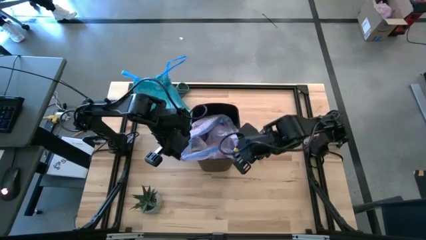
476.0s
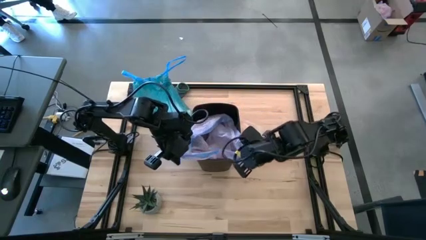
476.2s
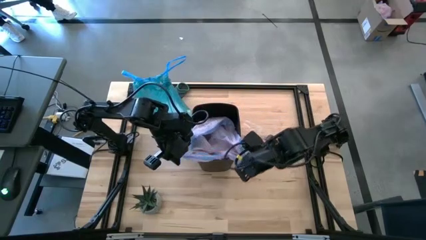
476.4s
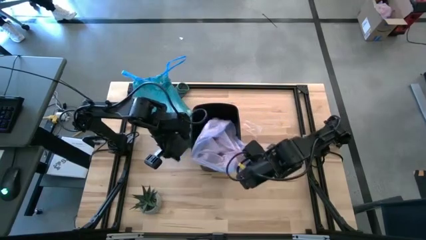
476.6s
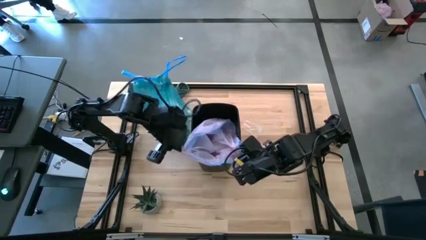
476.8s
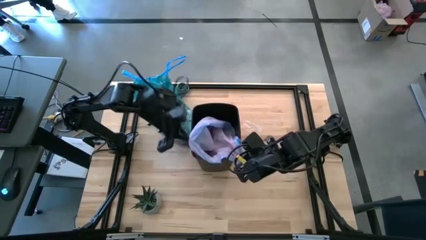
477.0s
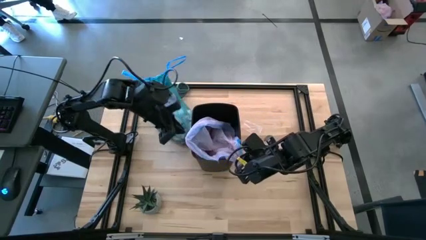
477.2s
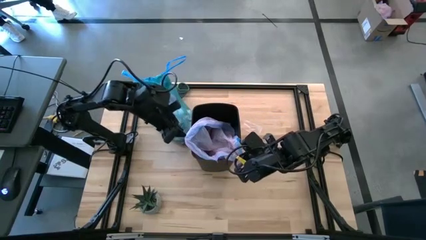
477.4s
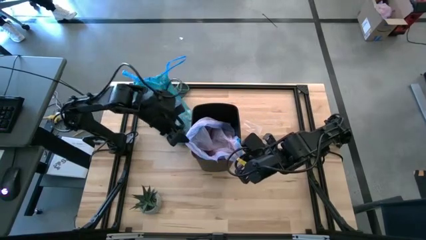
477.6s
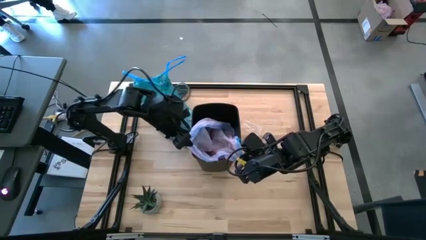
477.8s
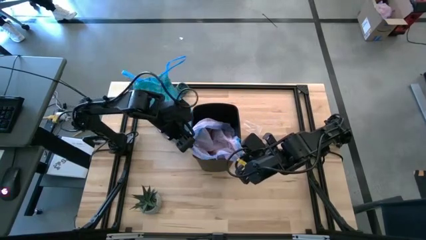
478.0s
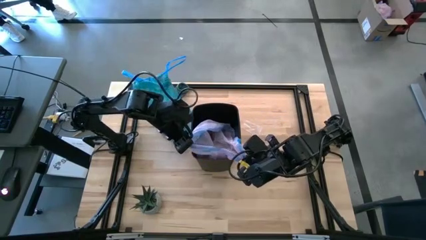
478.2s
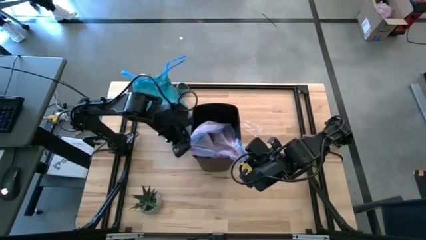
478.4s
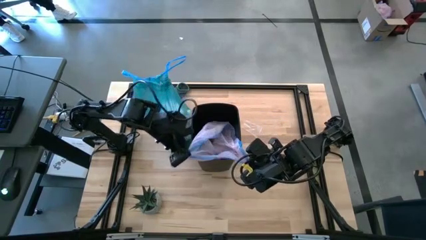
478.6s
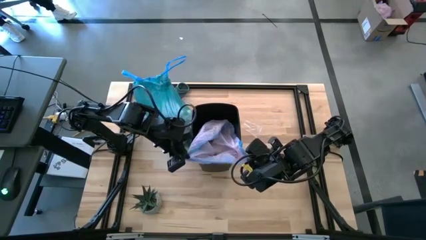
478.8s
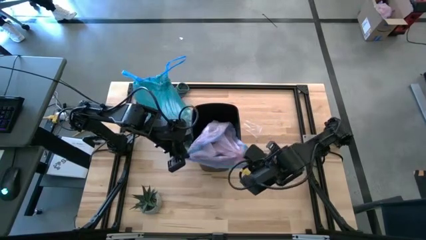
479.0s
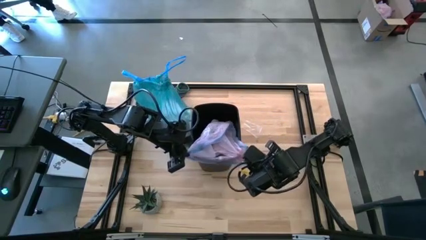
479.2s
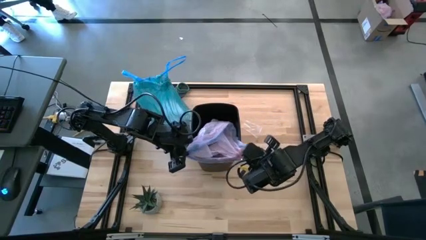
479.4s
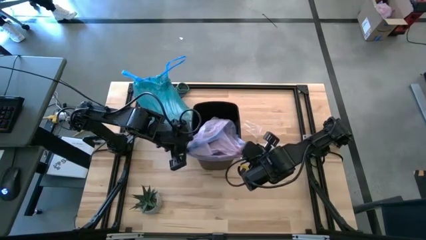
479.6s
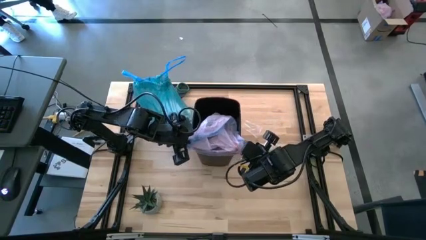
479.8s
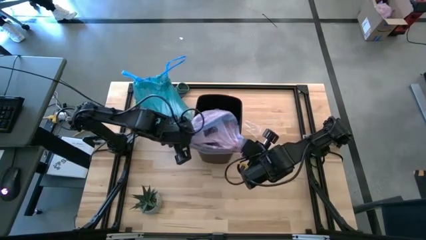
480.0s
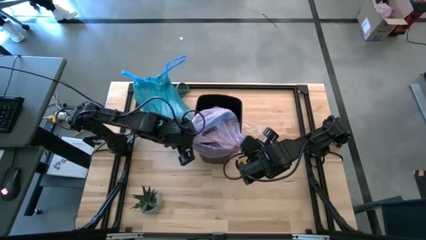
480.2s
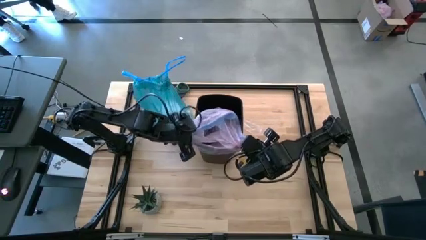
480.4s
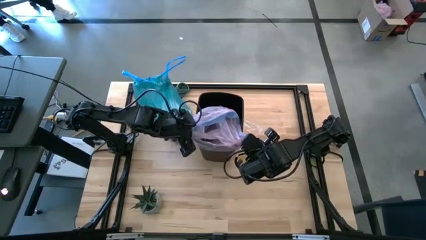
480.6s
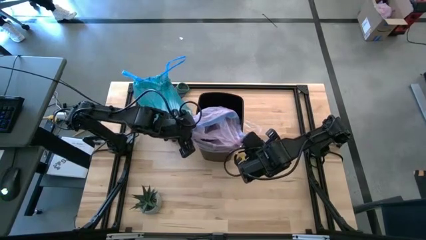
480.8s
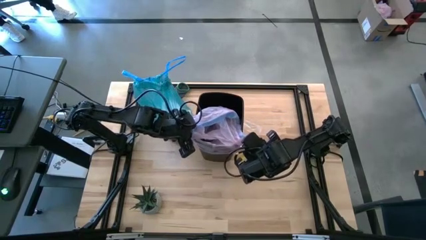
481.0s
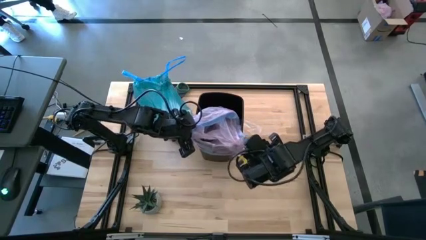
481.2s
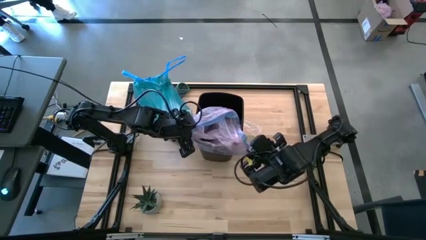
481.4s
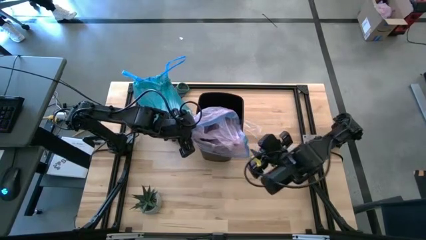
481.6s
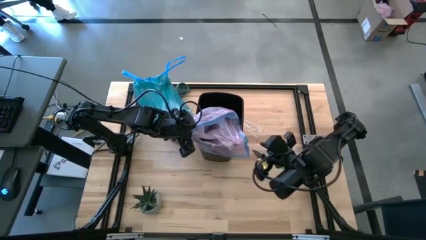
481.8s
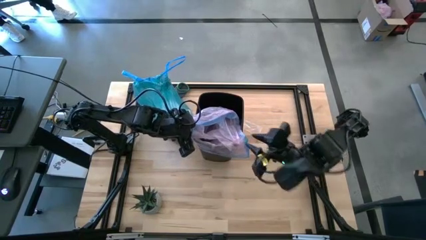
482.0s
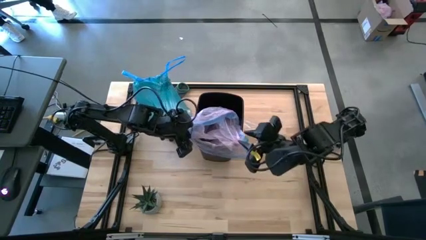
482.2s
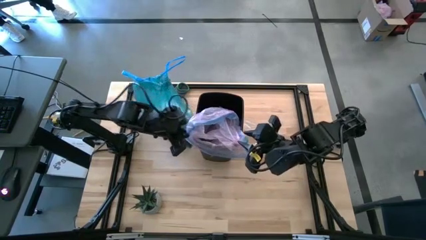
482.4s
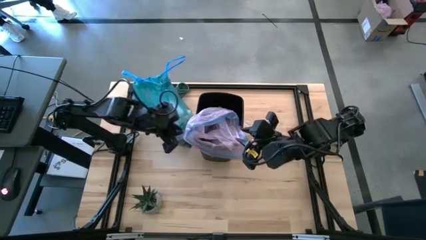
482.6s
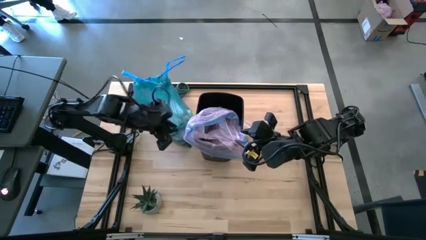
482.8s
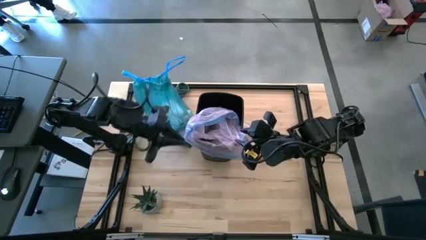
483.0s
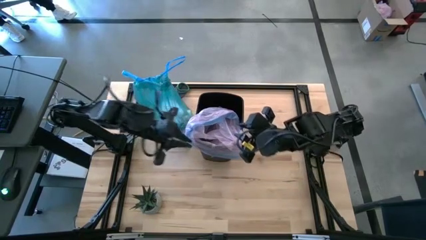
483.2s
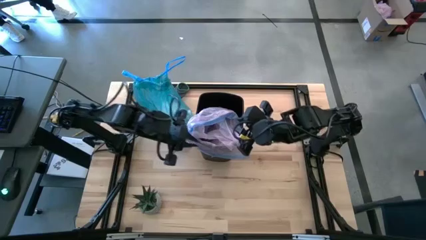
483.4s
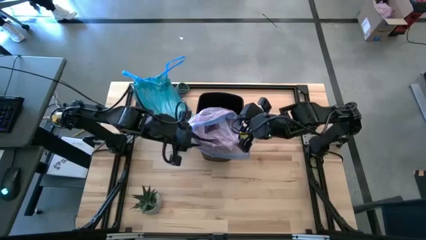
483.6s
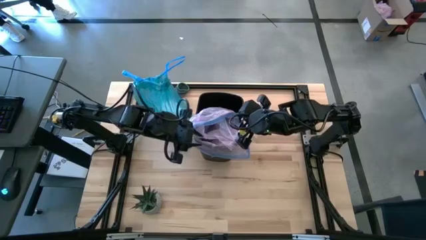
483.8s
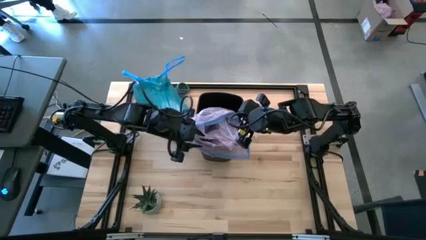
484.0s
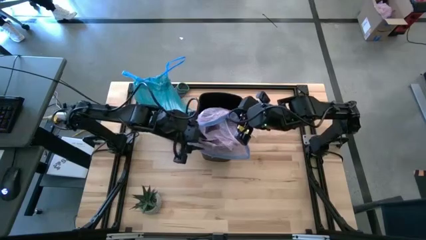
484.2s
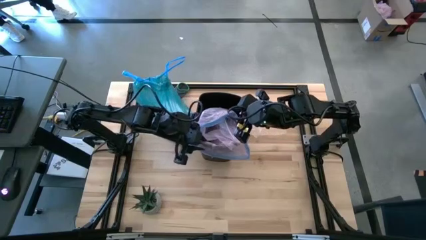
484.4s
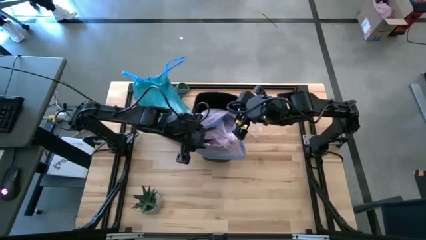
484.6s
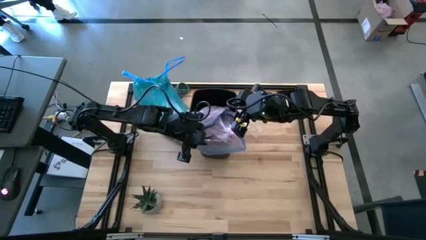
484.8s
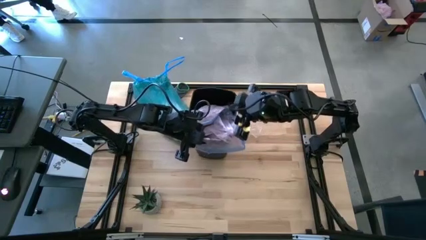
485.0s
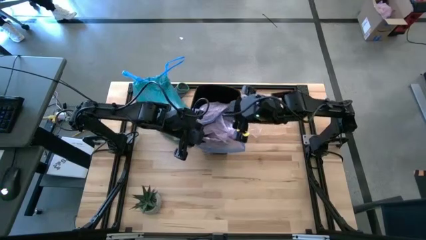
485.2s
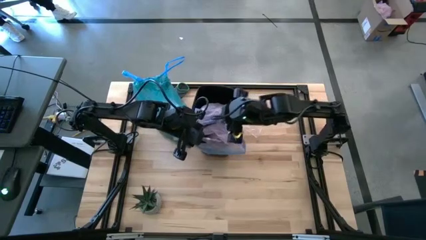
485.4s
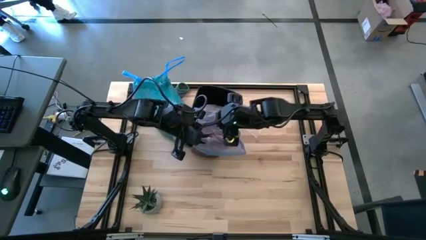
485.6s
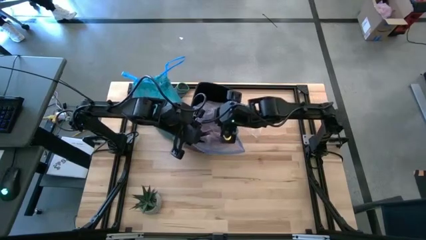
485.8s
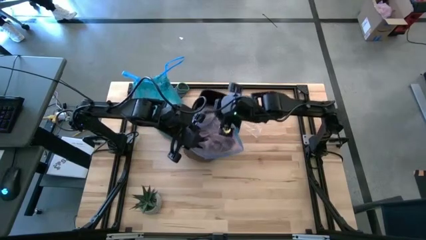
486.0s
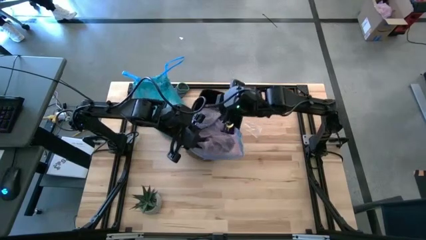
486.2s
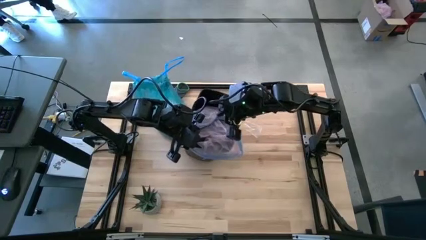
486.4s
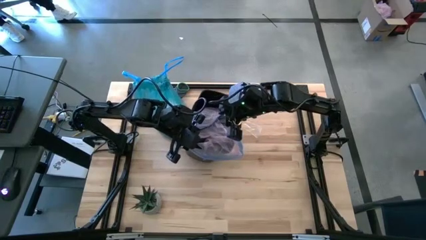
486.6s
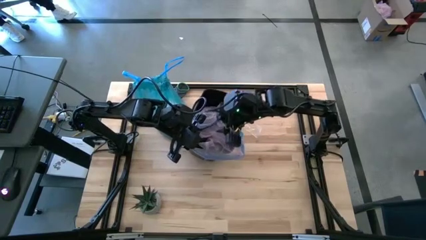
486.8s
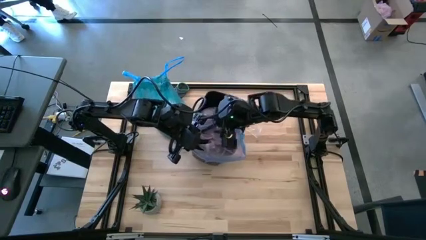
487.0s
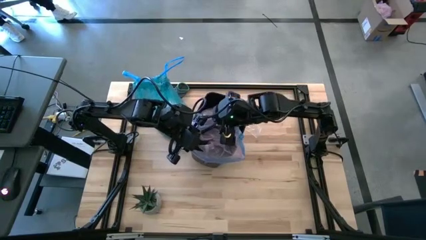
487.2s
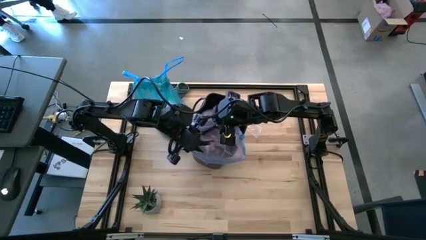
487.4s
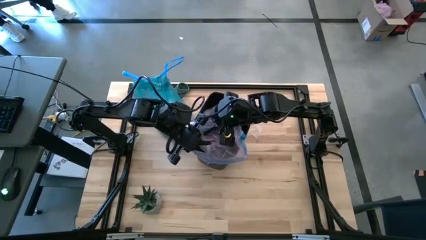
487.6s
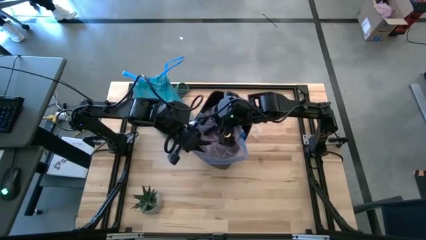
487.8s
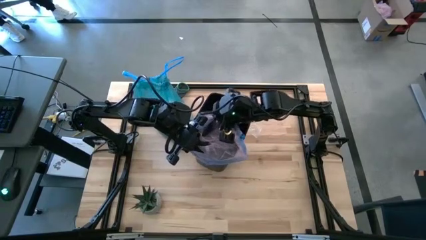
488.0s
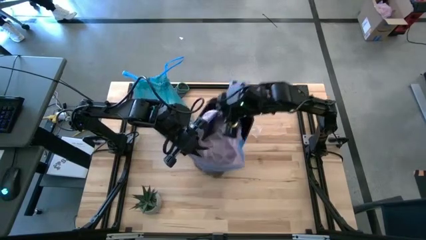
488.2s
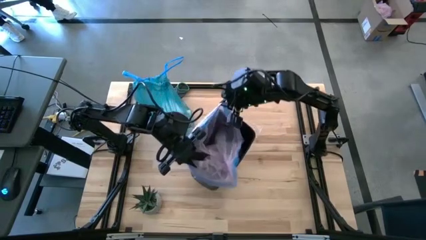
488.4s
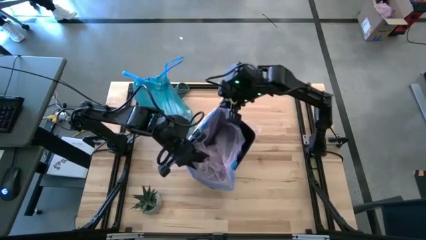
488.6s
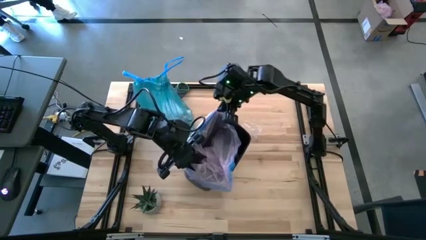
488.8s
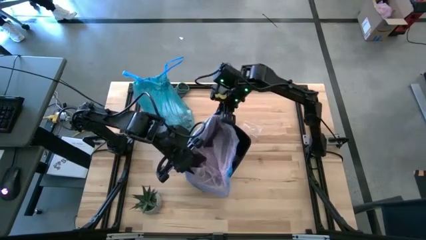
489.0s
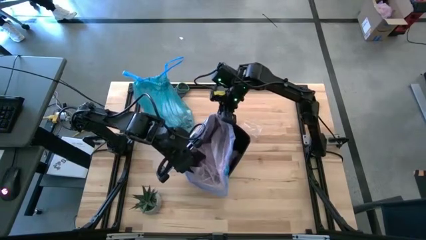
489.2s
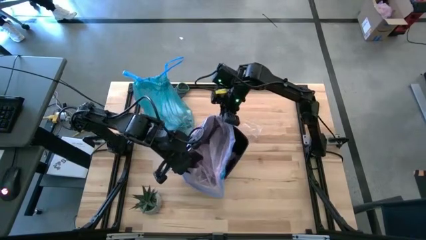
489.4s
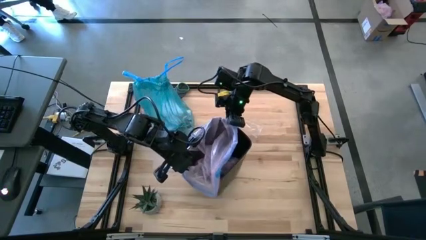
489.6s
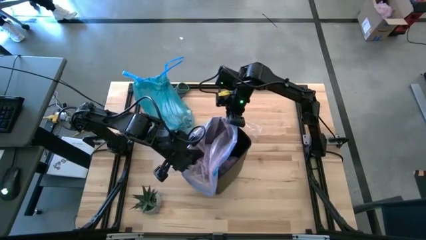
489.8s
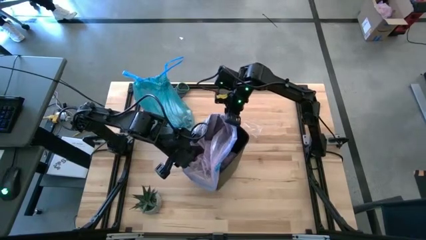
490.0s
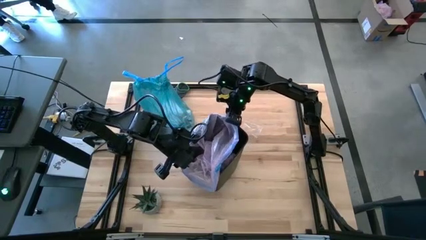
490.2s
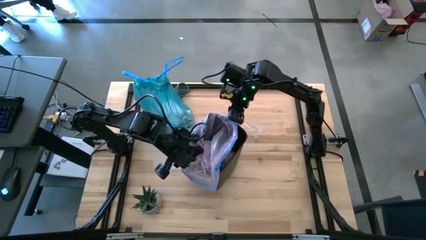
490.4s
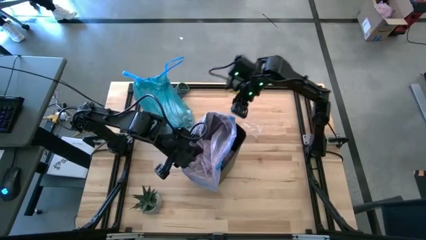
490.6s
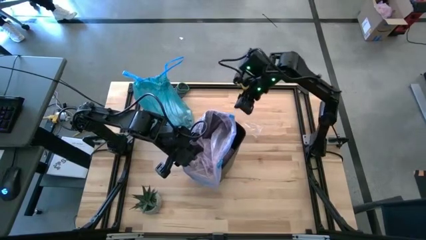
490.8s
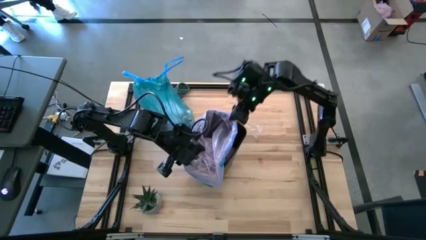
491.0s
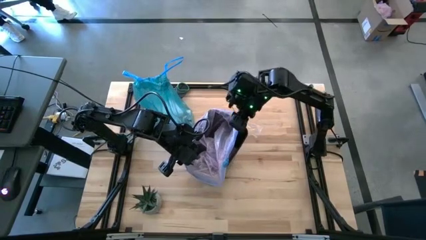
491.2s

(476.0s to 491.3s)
Task: place trash/remove bag and relplace
Insert the pink trash bag into the trash bin
